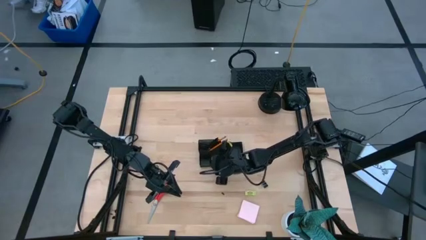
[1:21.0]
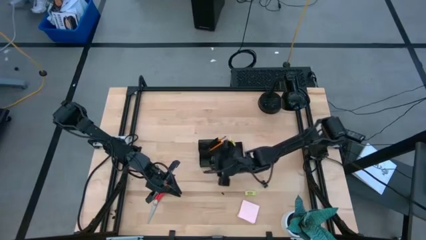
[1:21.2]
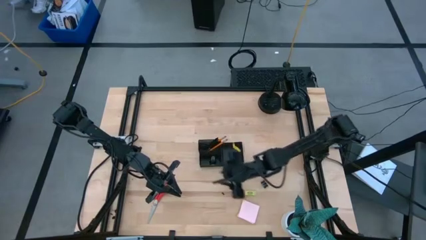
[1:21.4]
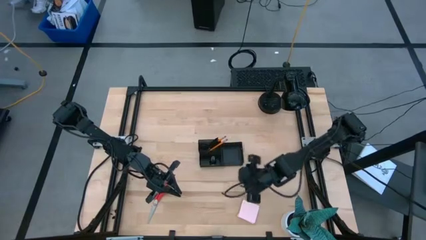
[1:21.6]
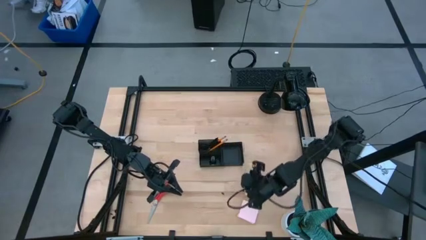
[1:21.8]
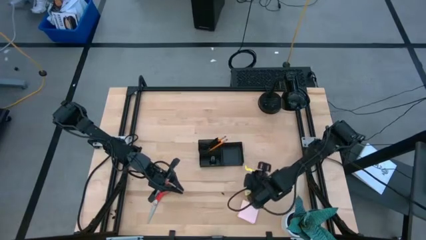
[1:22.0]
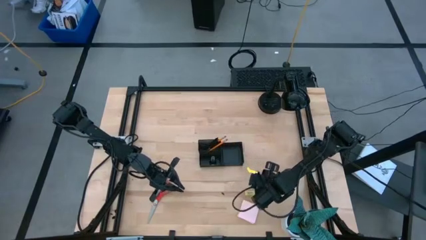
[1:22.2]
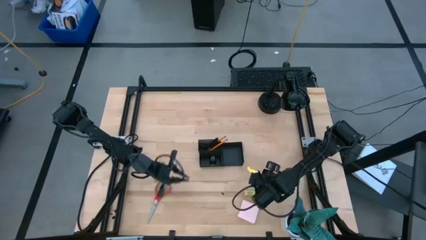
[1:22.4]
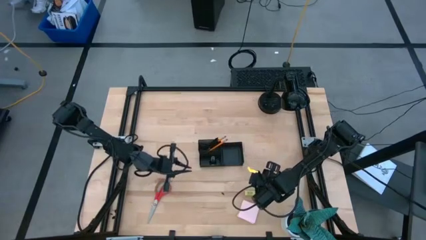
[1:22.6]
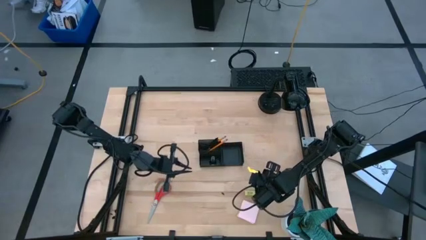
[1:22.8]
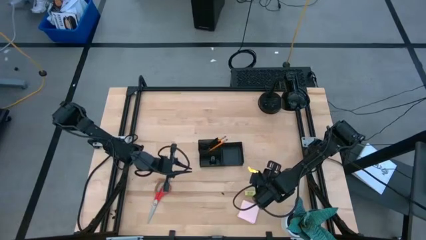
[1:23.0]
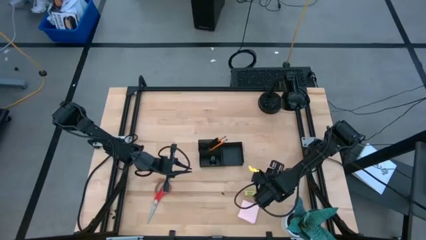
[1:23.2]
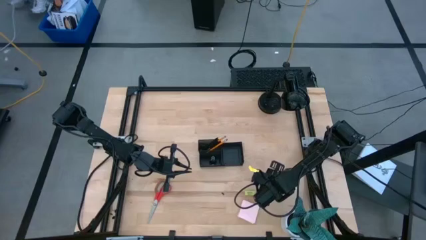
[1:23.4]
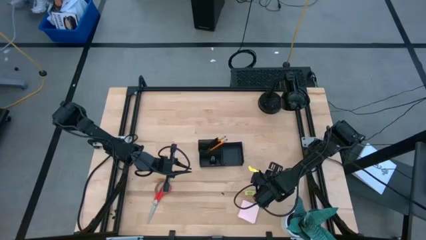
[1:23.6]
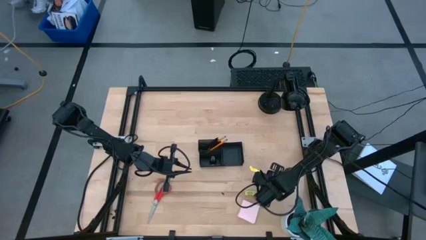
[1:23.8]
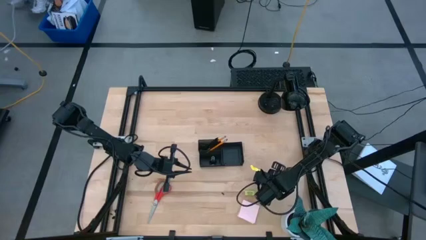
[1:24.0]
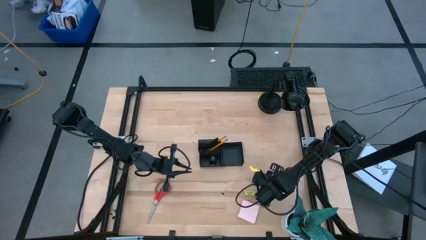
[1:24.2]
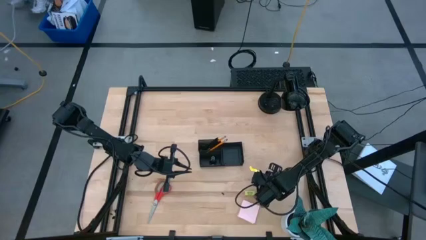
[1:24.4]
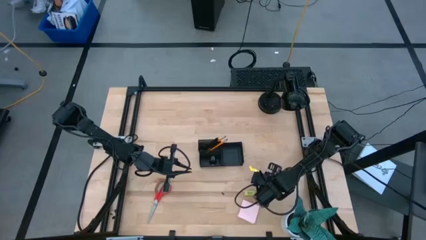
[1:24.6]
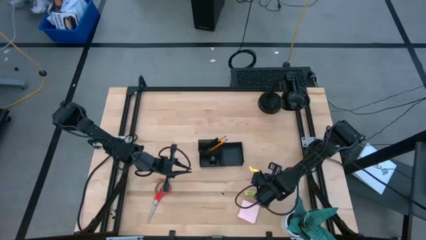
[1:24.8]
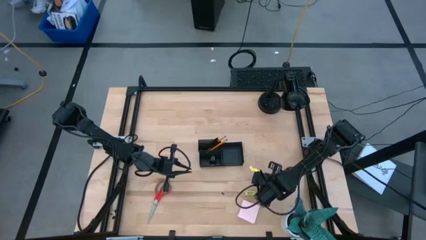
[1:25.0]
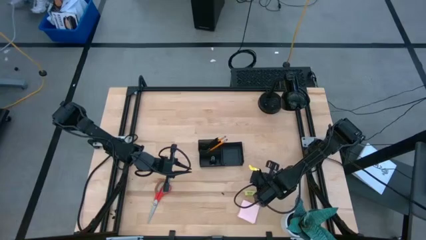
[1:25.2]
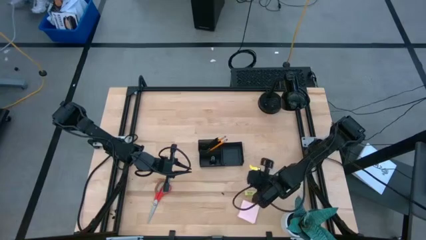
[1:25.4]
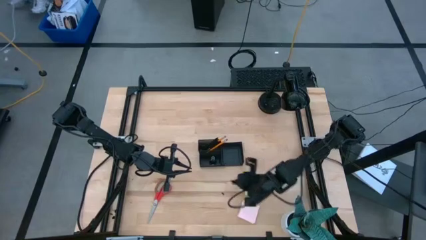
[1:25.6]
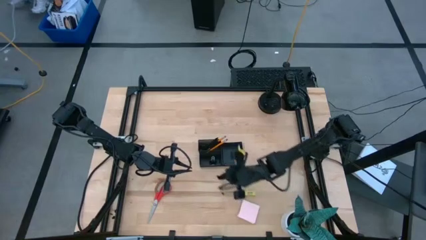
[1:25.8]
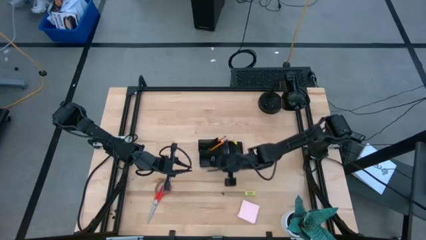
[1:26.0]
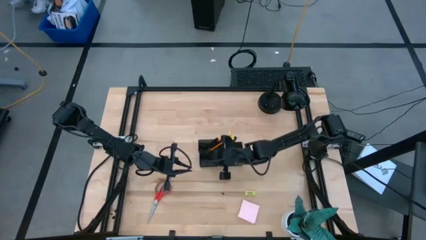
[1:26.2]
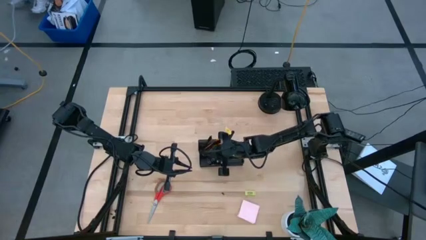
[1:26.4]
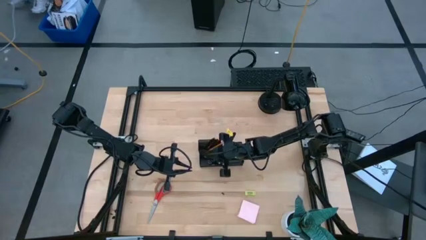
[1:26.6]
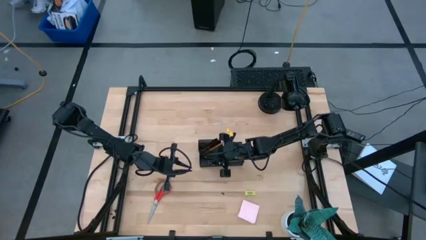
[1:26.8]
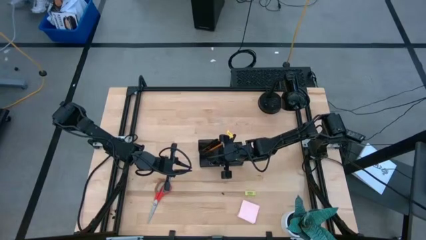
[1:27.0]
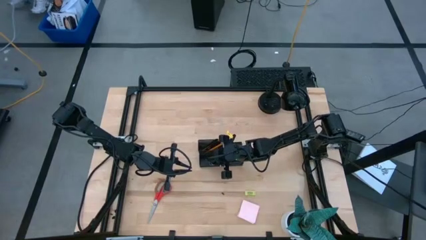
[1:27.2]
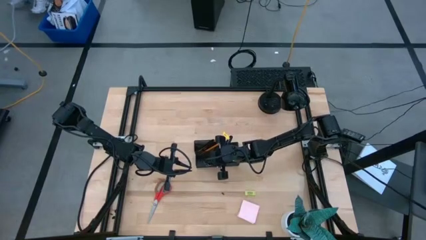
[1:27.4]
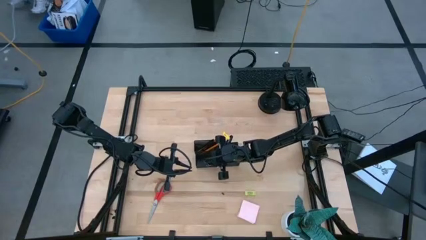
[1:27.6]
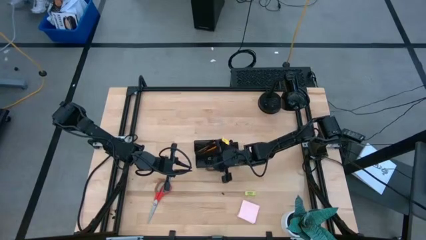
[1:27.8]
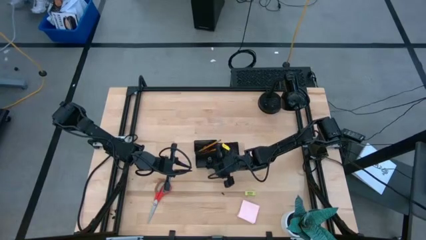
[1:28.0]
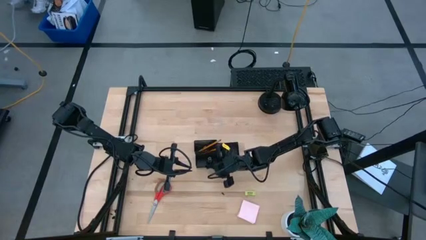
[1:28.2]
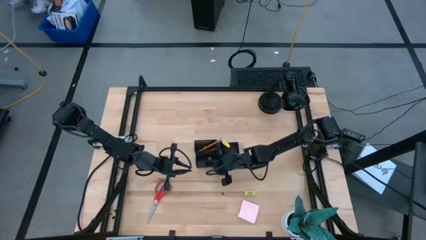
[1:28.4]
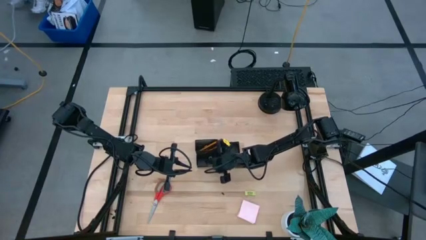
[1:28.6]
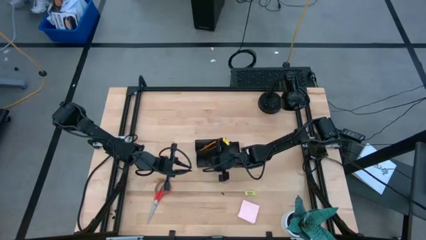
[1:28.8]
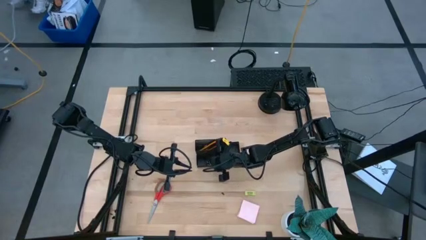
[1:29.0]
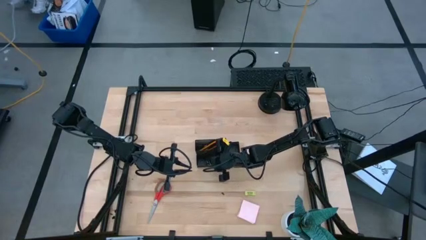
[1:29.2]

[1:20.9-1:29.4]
Task: Pick and place office supplies into organizer
Put the binder clip into the bottom left section of the desk organizer

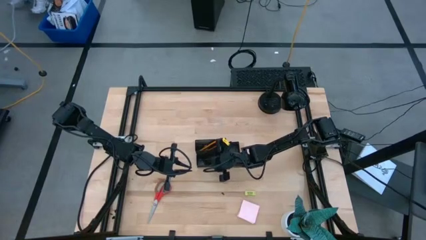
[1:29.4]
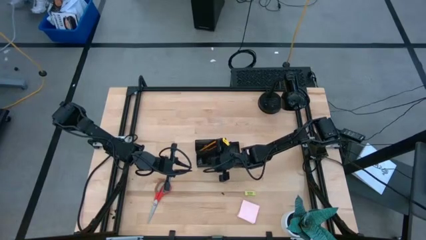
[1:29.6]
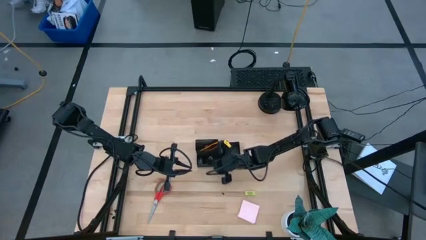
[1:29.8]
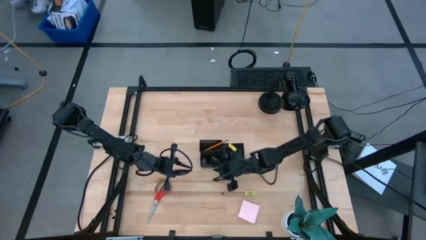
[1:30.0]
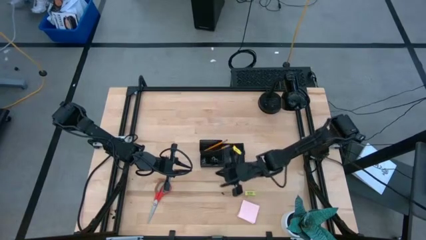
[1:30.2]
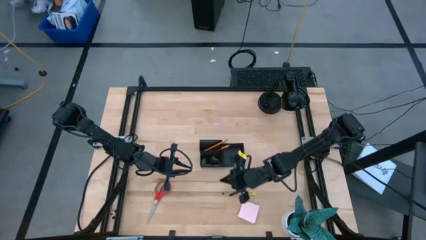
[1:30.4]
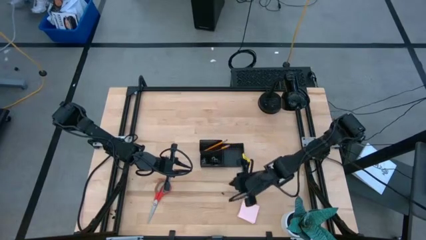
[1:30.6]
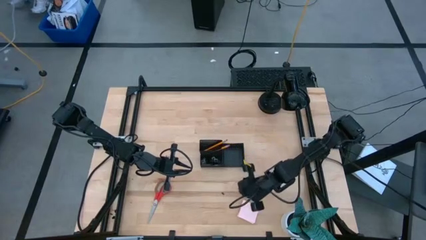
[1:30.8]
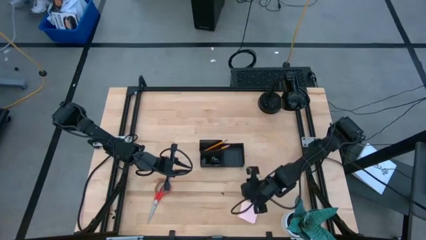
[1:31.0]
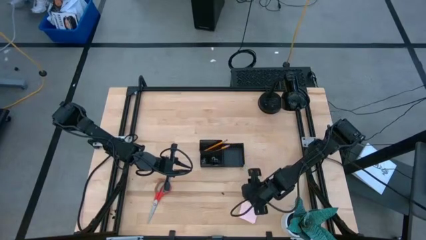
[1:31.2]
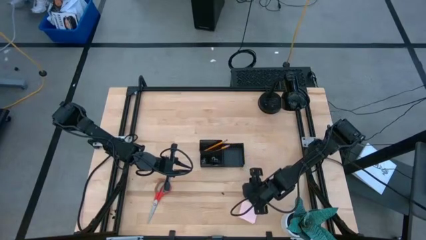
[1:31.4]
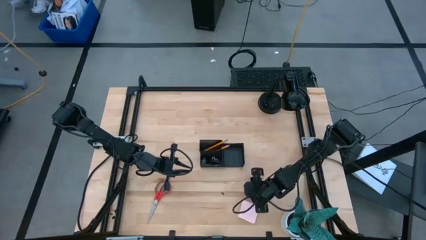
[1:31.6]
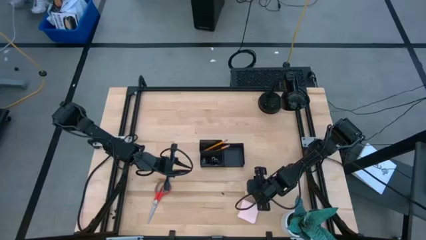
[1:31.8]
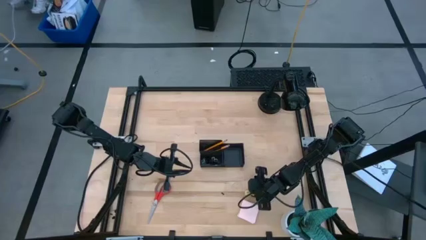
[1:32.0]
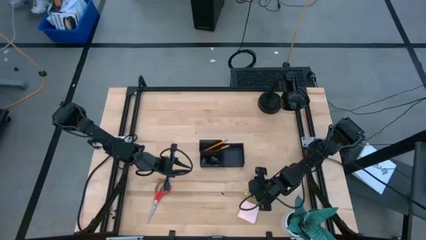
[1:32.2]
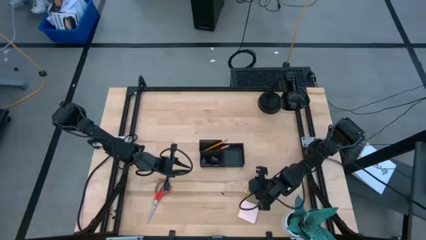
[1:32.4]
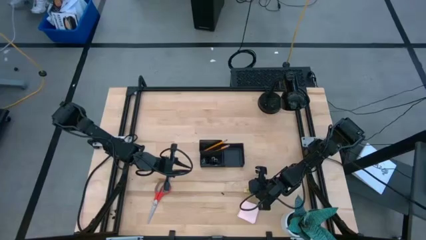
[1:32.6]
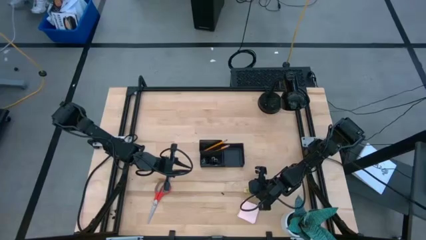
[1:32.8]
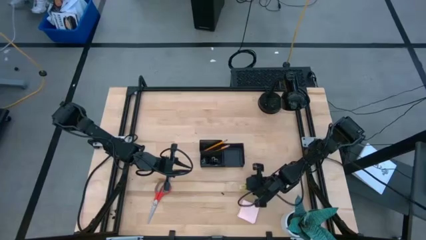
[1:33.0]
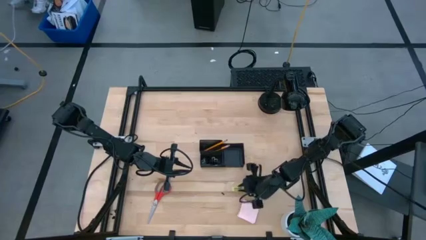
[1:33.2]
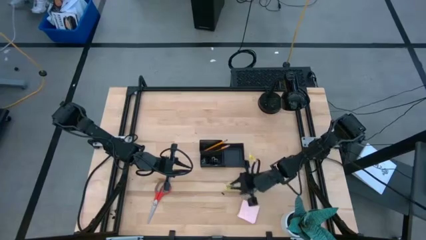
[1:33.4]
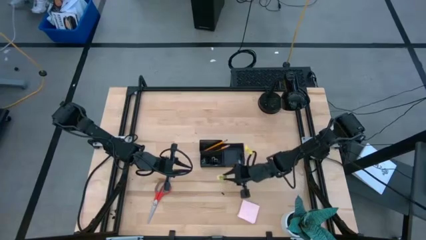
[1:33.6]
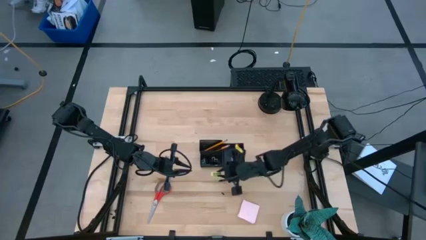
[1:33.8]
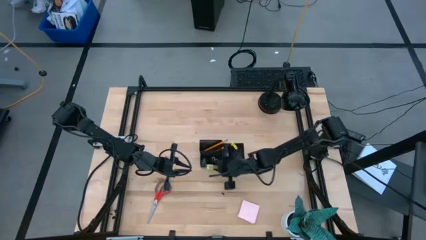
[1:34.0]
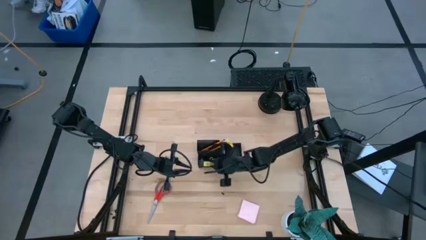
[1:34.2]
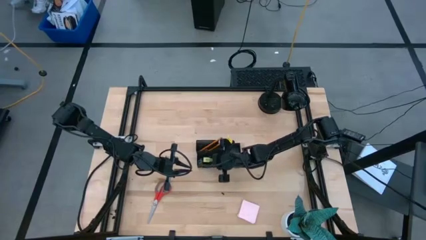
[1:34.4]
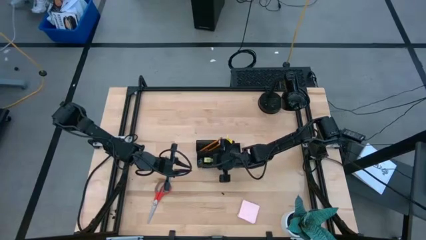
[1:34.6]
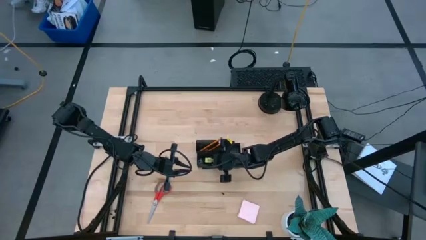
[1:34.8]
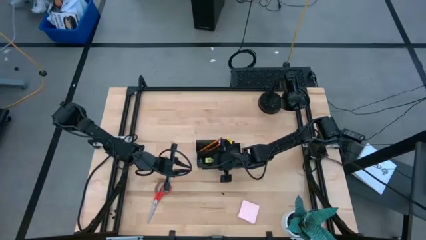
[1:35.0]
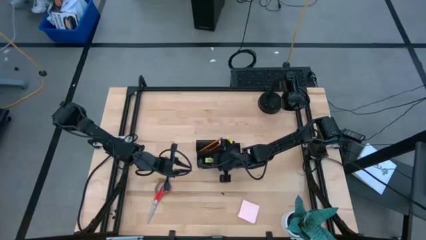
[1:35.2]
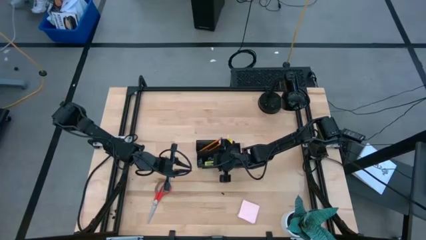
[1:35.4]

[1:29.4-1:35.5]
Put the eraser into the bottom left section of the desk organizer

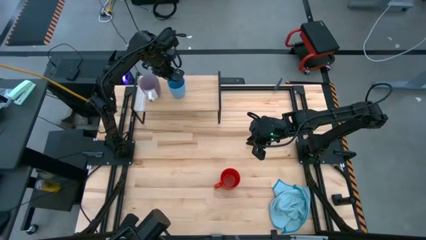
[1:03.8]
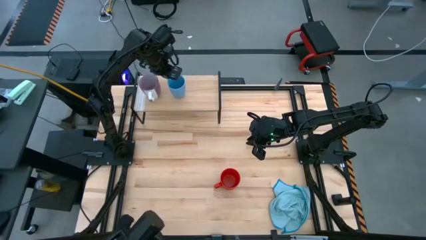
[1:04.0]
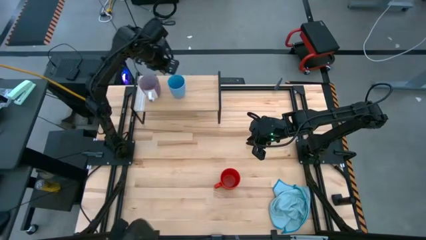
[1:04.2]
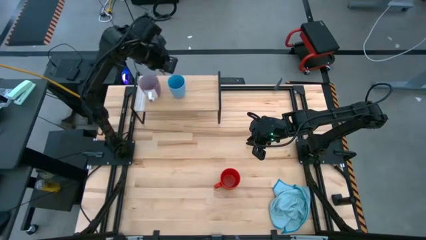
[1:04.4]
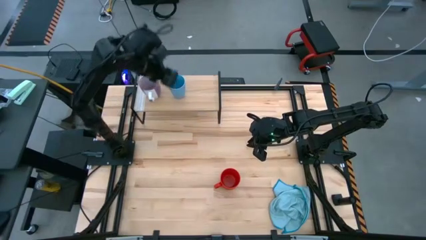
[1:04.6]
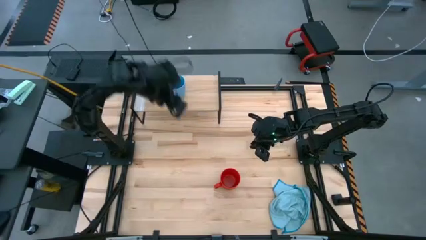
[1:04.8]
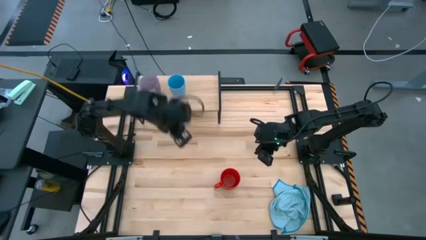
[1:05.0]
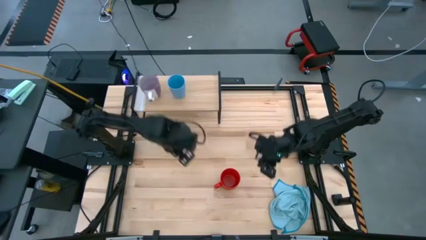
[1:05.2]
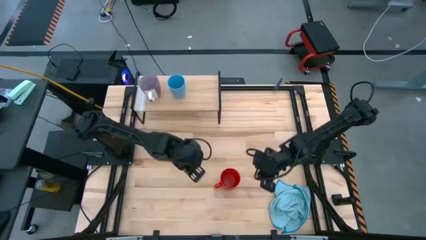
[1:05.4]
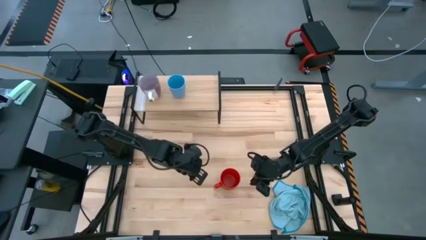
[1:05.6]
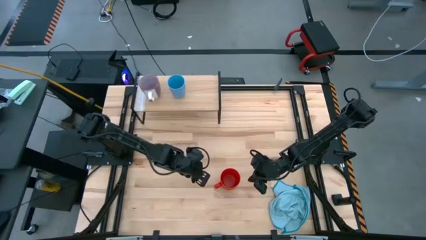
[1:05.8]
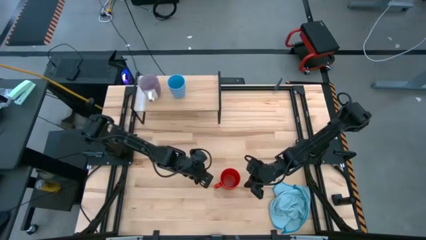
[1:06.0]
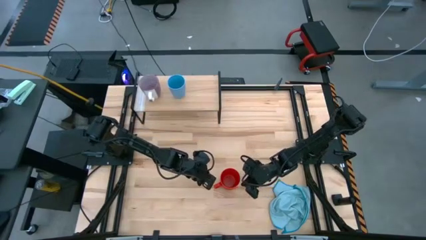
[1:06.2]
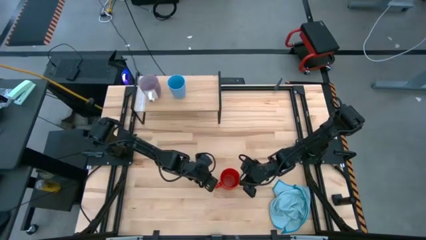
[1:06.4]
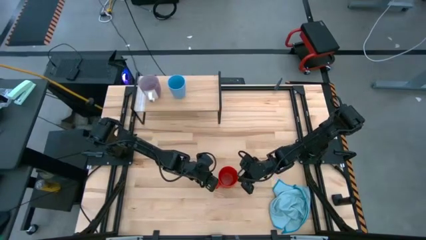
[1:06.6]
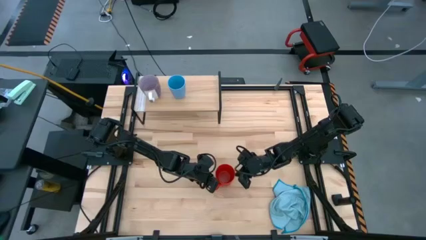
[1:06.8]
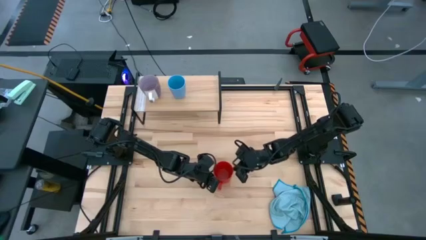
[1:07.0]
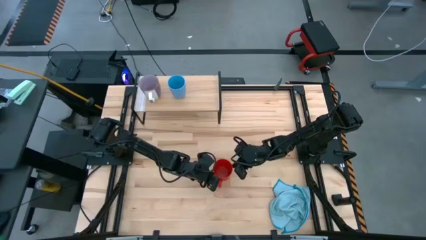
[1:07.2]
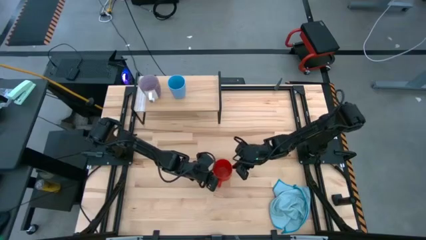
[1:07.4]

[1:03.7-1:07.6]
Task: Stack small to large cups/mugs on shelf
Put the red mug on the shelf
